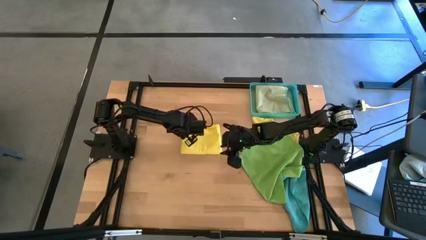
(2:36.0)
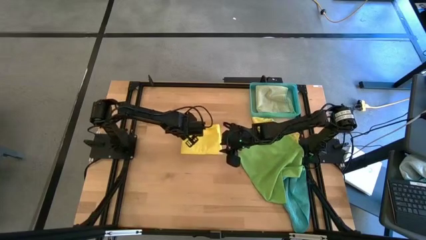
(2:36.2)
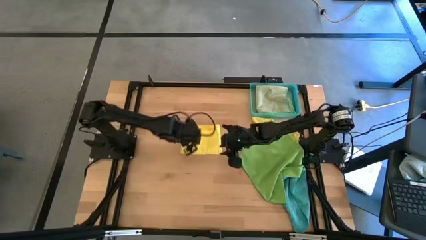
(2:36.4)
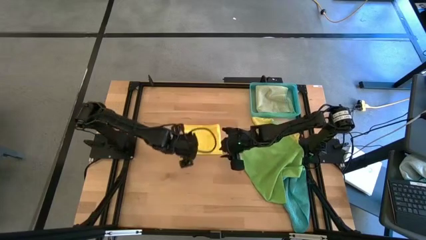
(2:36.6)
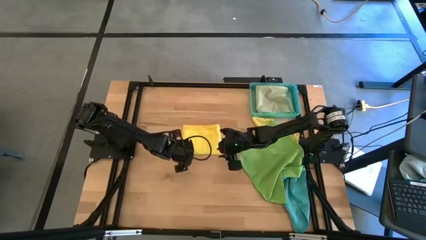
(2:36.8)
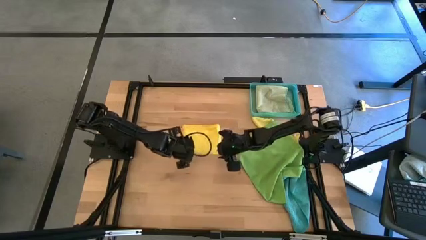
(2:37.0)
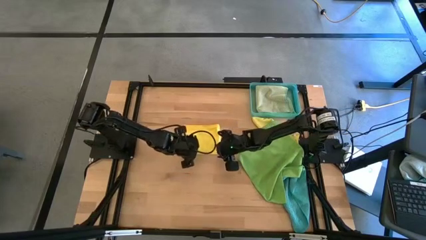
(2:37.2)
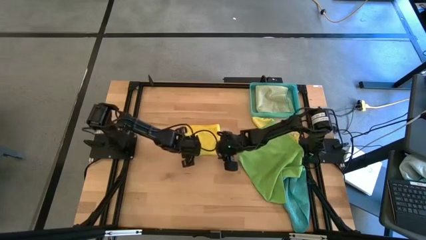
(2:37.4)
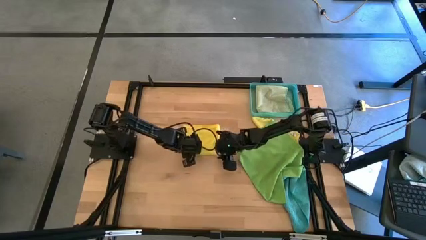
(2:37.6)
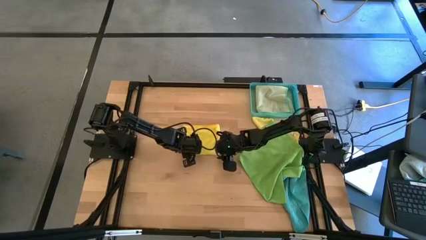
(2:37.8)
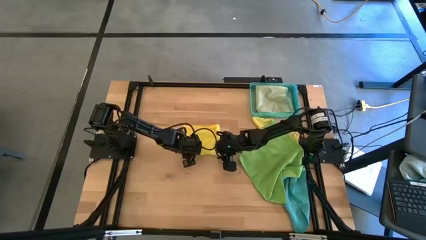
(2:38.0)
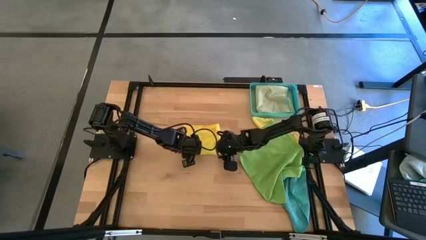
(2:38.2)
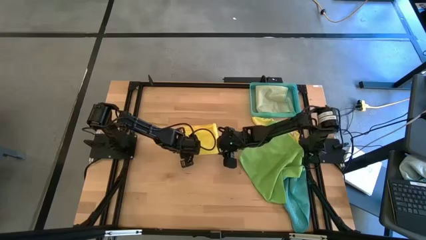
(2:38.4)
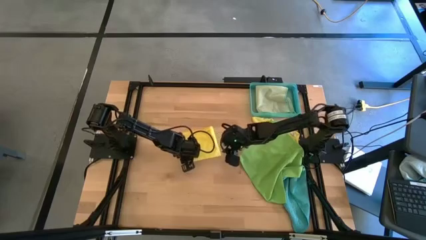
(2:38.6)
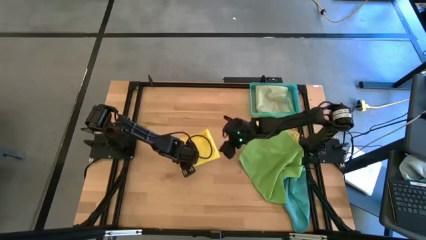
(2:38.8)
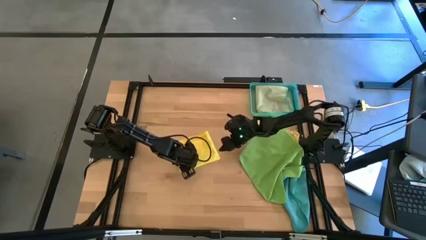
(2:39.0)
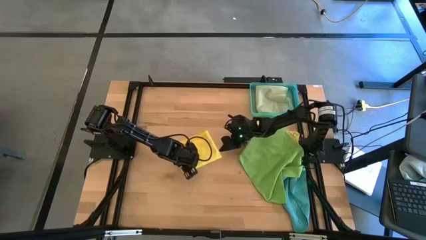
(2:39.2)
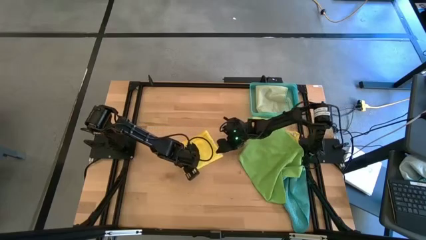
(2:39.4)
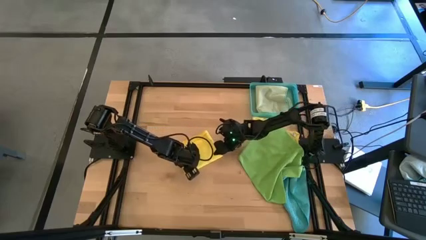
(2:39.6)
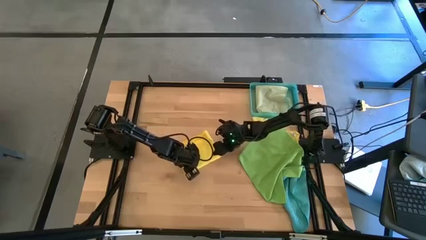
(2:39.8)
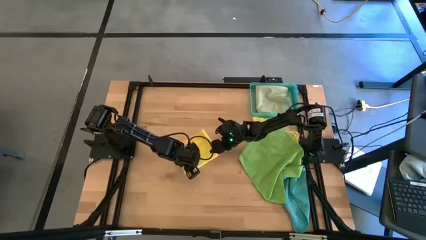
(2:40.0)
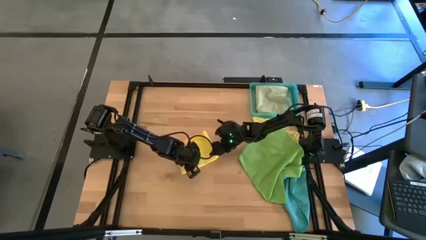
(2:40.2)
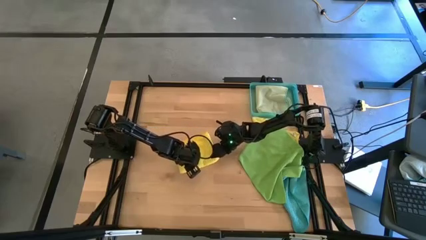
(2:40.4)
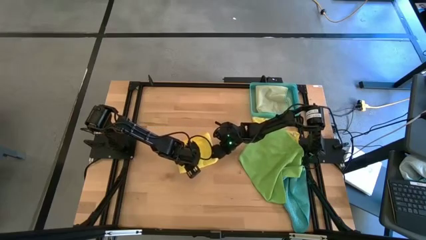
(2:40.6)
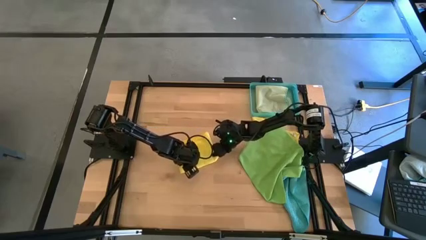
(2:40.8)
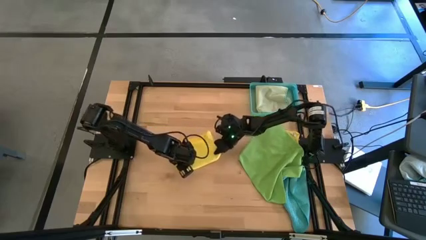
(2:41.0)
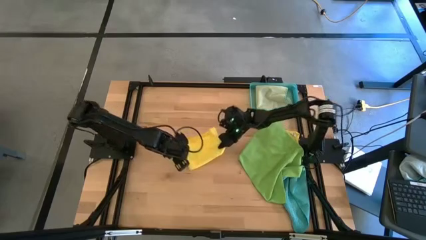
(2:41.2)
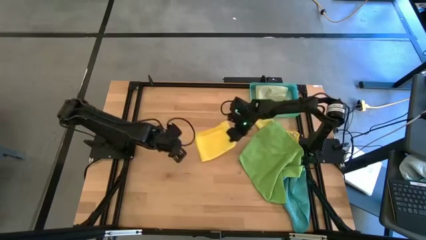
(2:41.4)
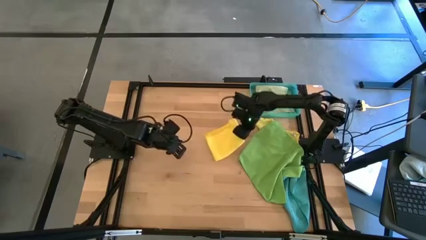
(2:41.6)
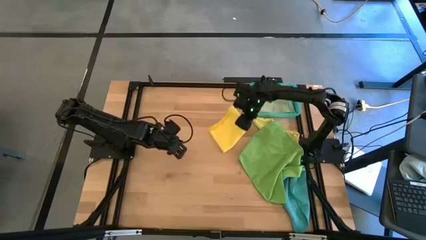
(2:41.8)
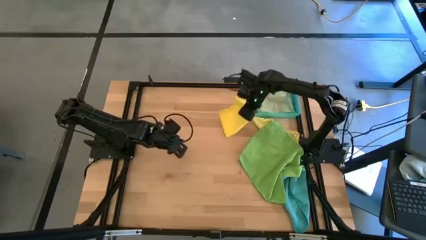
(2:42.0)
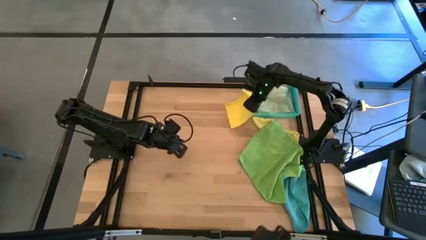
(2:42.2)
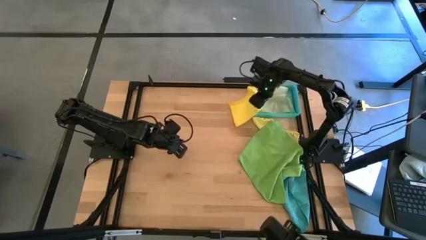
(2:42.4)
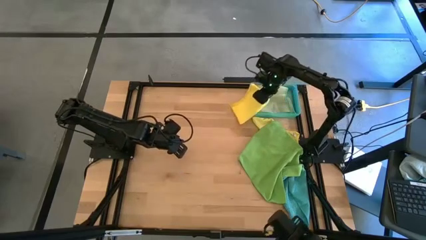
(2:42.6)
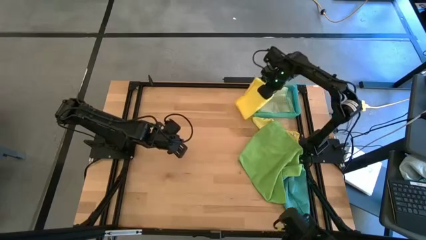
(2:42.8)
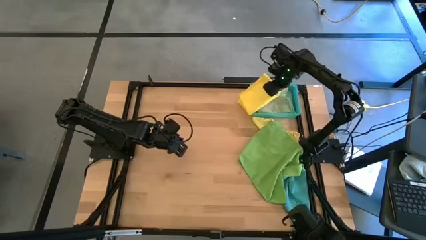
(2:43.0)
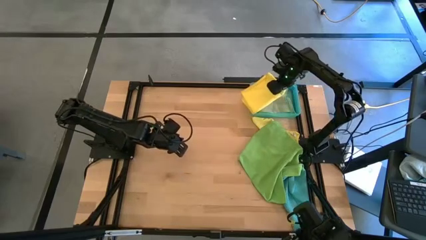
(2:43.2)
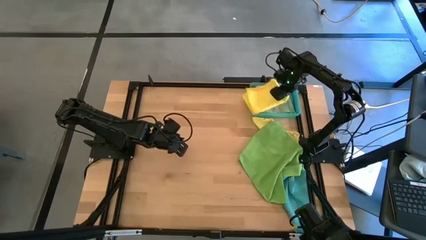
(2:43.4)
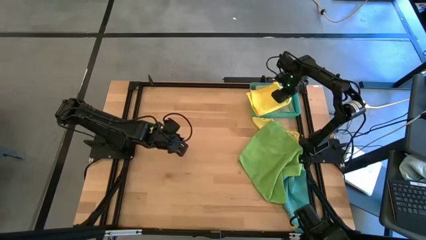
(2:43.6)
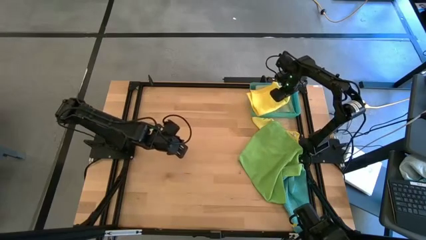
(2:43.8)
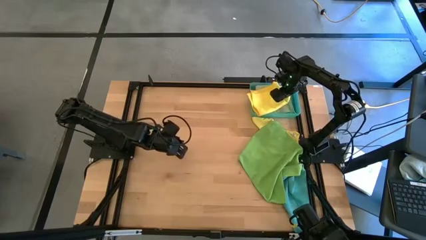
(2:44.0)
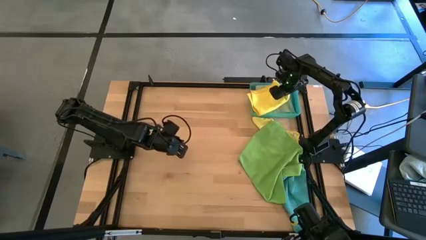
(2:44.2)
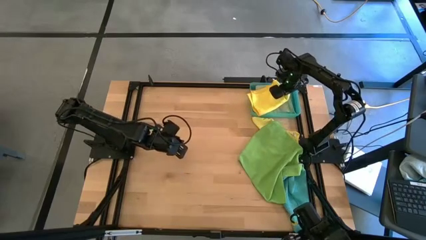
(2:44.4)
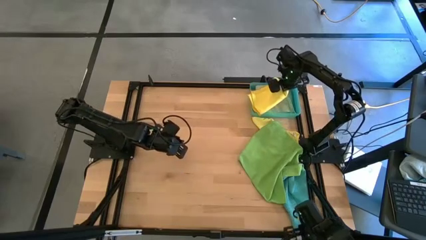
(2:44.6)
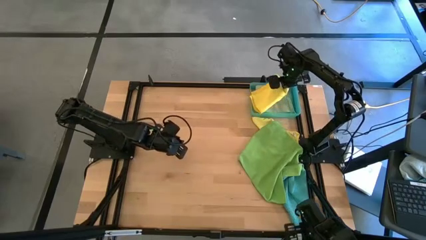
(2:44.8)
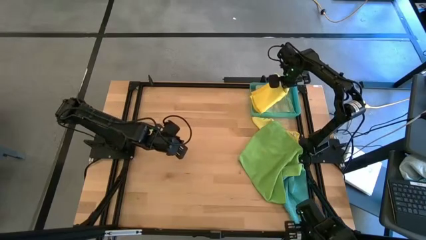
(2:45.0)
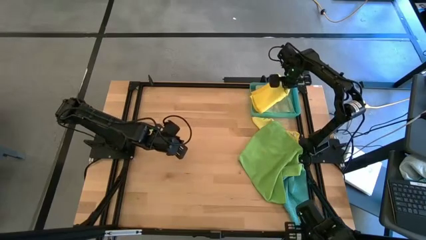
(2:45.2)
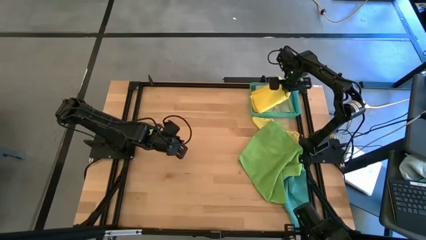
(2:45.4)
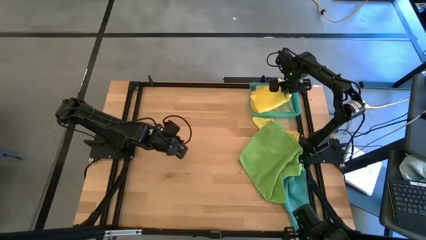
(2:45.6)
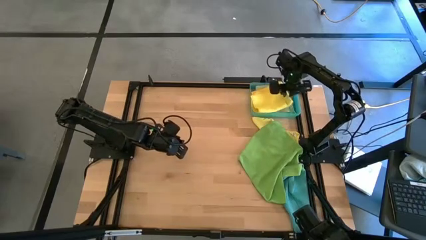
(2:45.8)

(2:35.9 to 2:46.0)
Task: Fold microfiber towels
Stack the folded left yellow microfiber cloth on top of the folded light green microfiber cloth

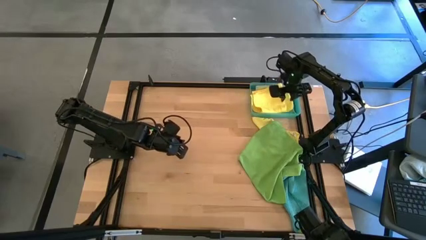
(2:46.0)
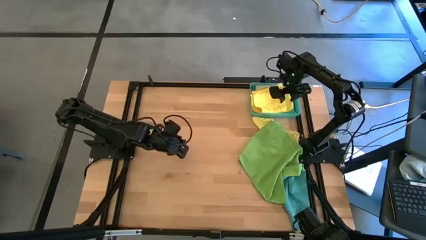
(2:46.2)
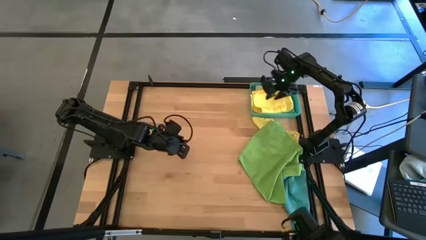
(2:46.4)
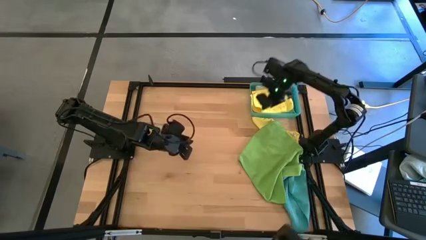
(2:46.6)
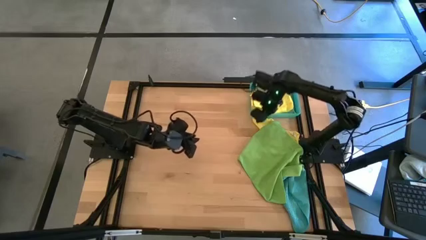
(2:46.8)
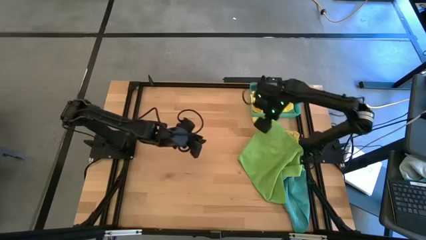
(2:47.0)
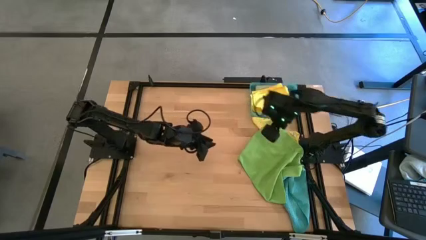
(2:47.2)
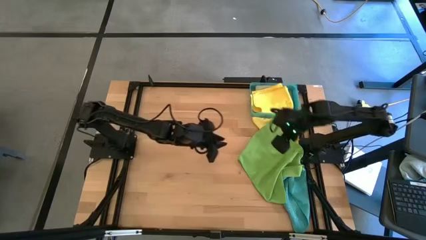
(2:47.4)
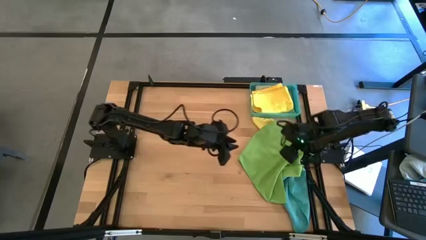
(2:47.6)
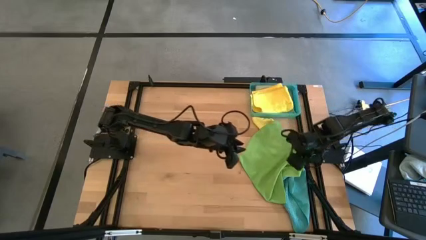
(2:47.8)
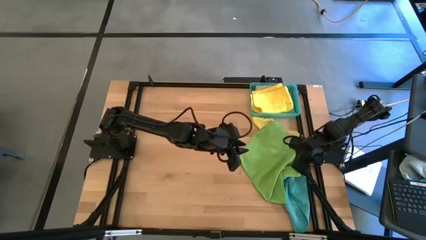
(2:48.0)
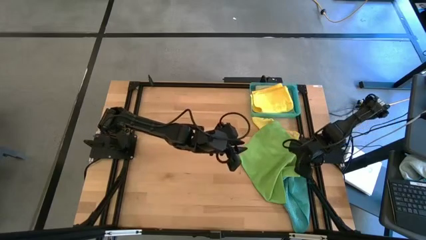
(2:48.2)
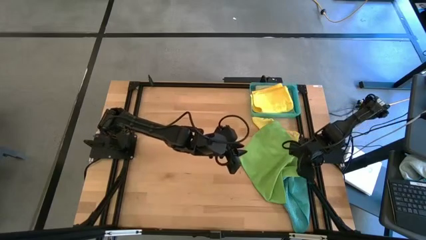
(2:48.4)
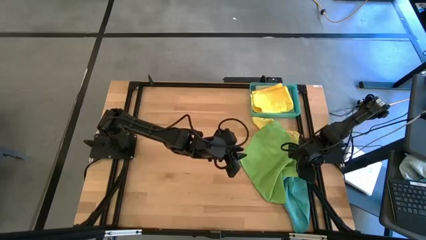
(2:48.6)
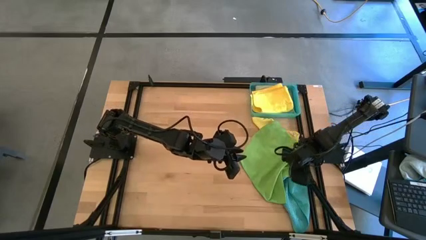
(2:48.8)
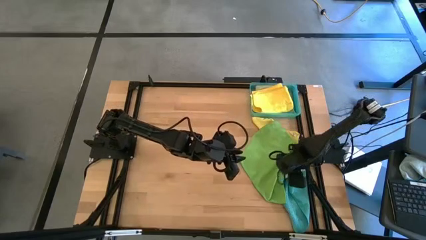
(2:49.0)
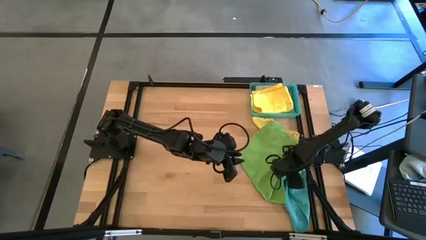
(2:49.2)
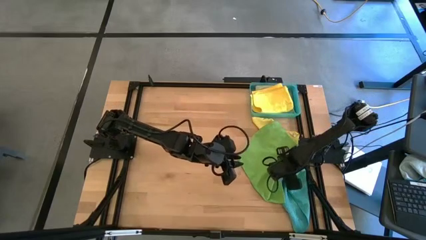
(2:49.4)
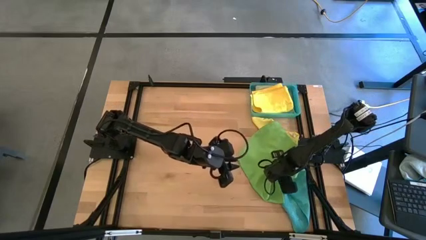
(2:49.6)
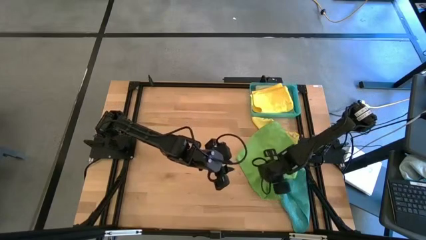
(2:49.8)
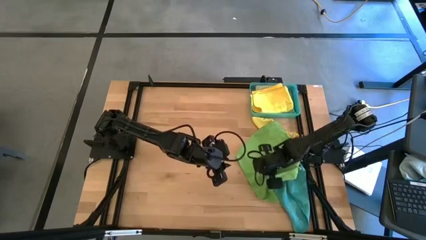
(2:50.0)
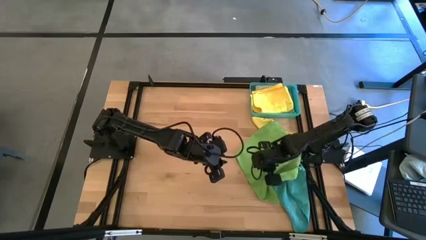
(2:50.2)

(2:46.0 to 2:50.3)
Fold the green microfiber cloth
